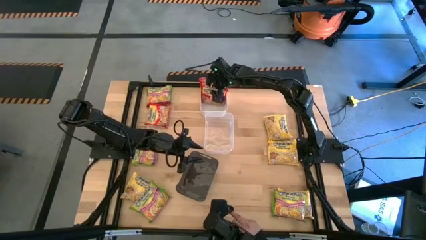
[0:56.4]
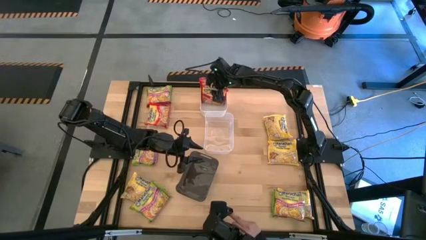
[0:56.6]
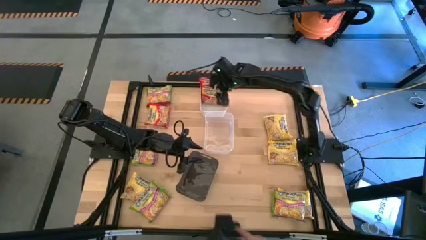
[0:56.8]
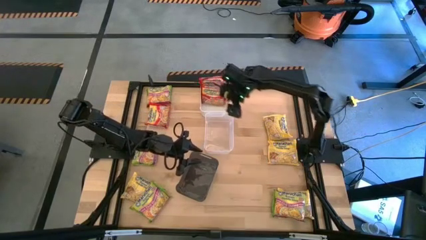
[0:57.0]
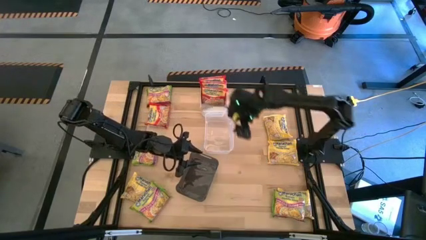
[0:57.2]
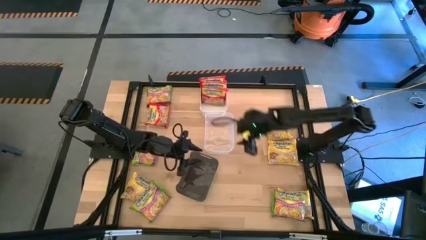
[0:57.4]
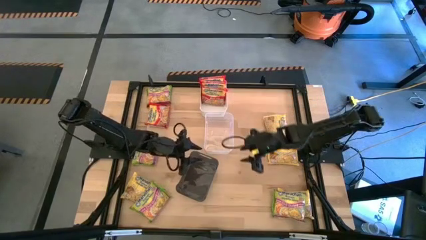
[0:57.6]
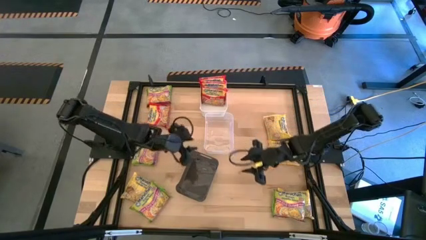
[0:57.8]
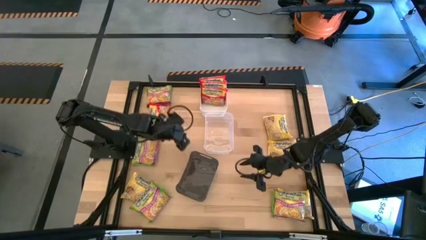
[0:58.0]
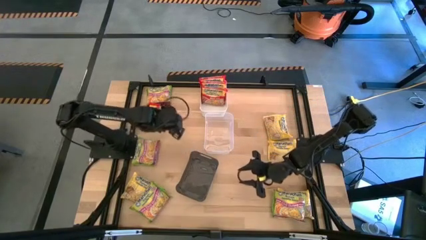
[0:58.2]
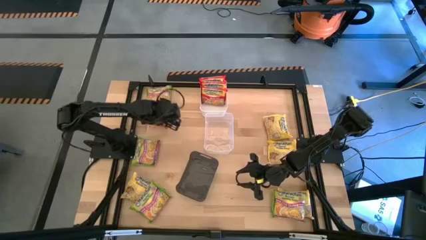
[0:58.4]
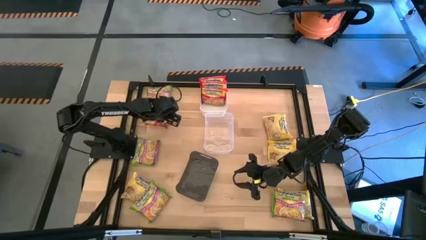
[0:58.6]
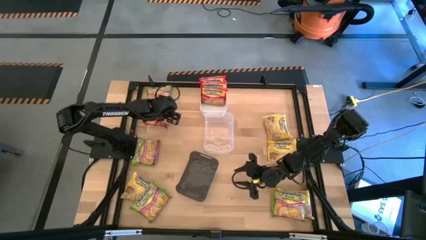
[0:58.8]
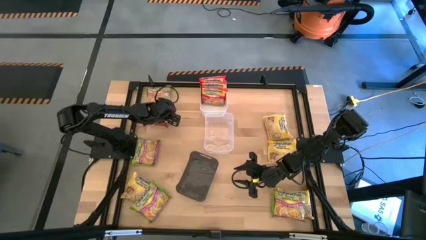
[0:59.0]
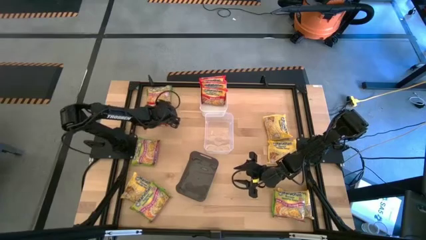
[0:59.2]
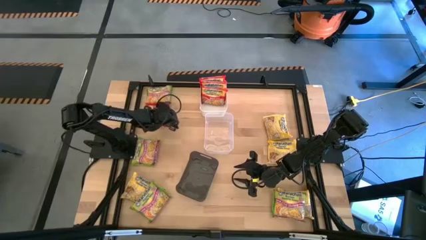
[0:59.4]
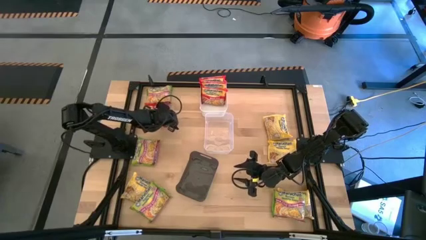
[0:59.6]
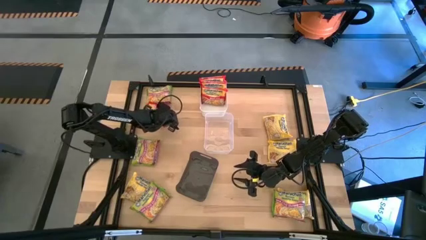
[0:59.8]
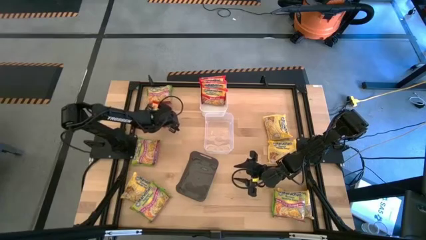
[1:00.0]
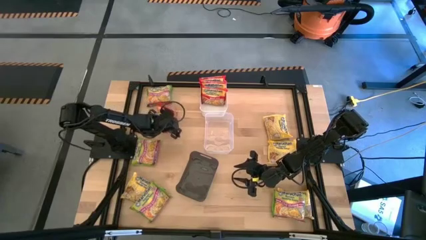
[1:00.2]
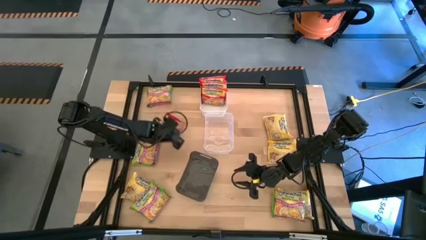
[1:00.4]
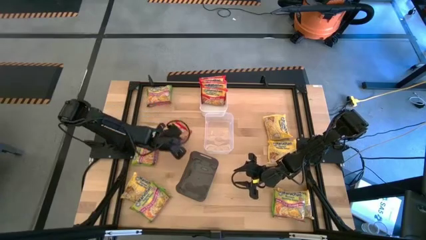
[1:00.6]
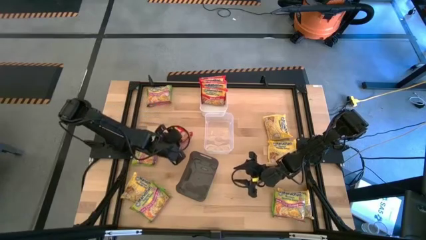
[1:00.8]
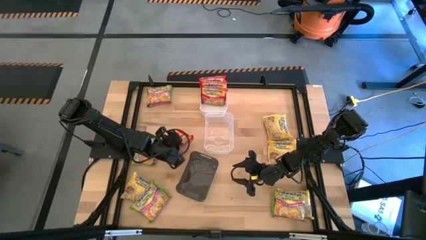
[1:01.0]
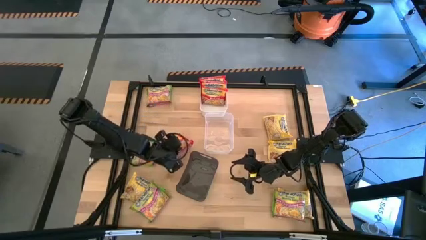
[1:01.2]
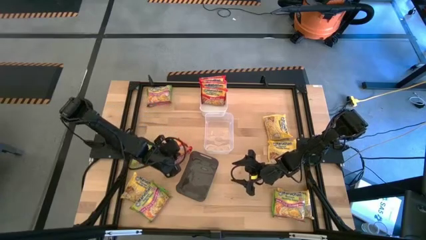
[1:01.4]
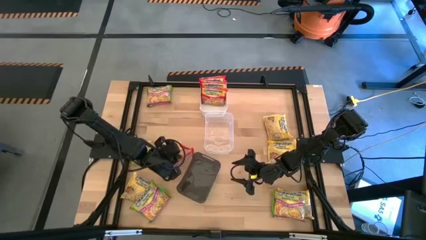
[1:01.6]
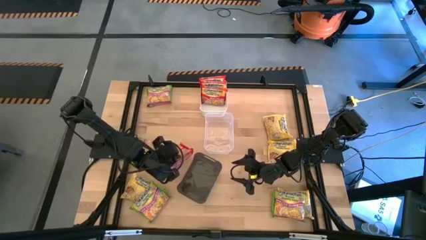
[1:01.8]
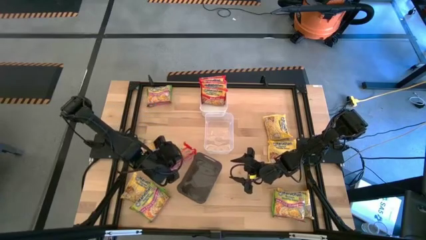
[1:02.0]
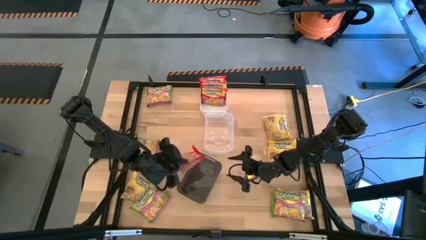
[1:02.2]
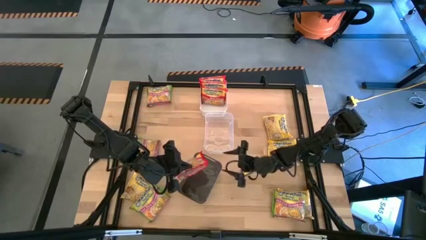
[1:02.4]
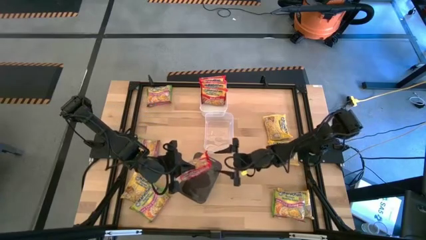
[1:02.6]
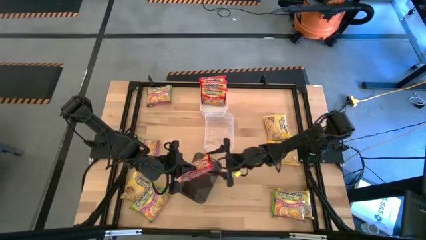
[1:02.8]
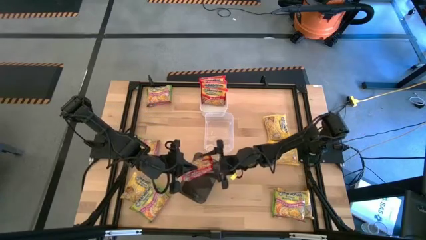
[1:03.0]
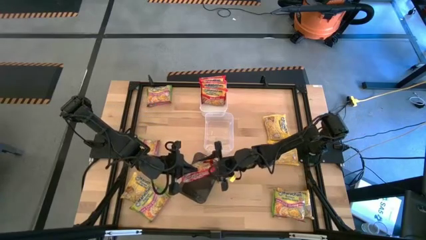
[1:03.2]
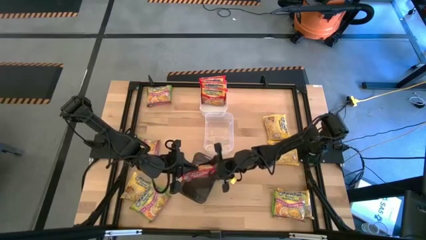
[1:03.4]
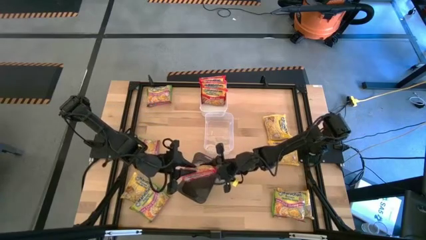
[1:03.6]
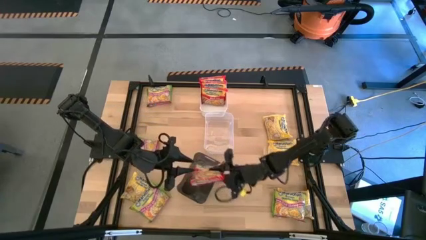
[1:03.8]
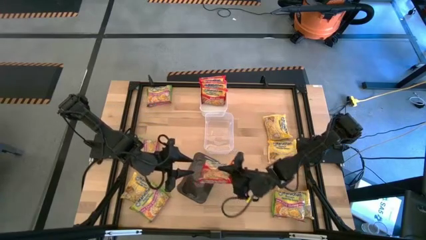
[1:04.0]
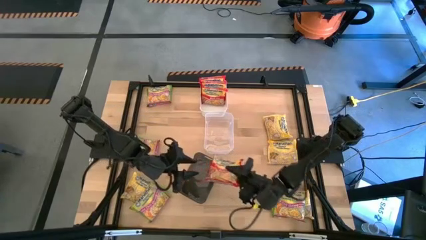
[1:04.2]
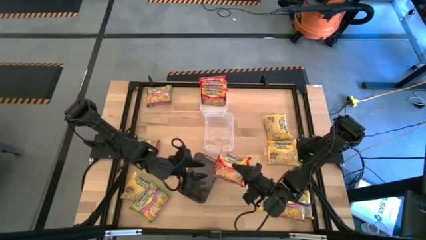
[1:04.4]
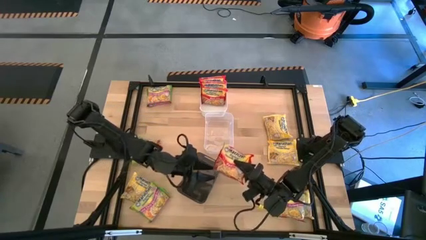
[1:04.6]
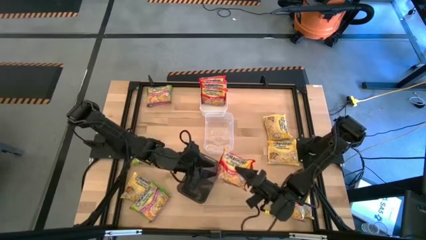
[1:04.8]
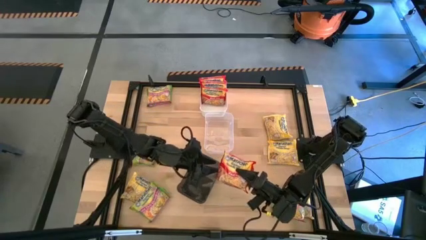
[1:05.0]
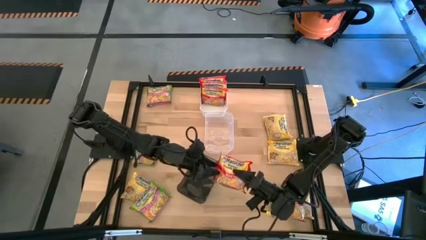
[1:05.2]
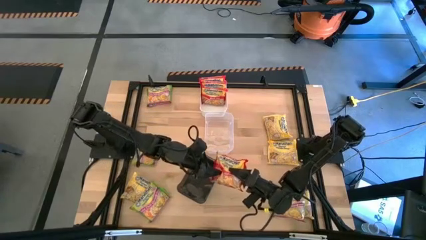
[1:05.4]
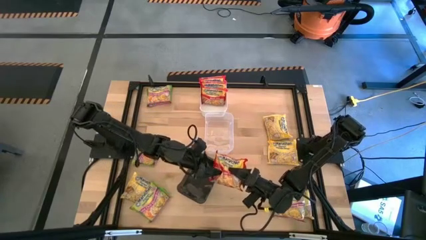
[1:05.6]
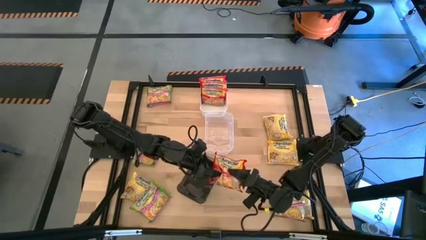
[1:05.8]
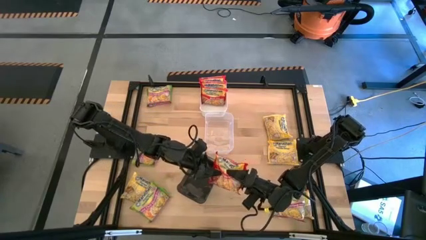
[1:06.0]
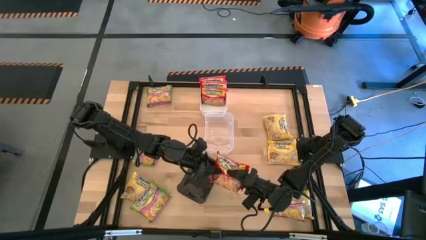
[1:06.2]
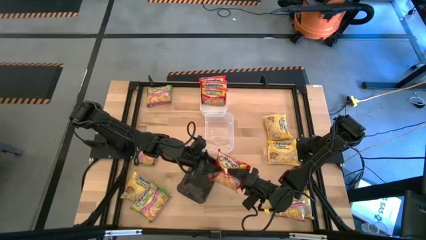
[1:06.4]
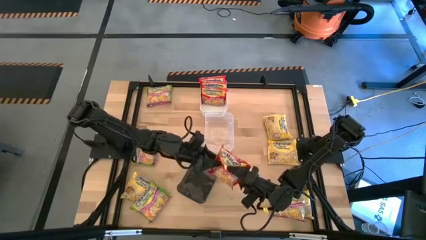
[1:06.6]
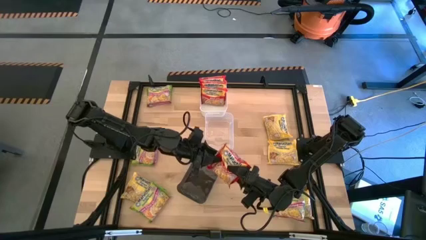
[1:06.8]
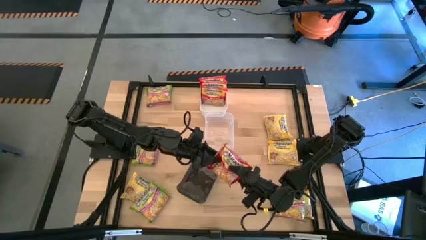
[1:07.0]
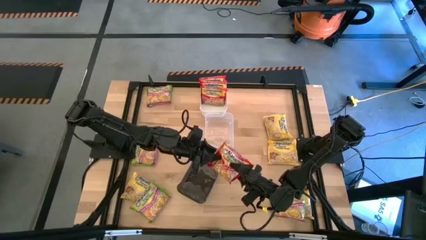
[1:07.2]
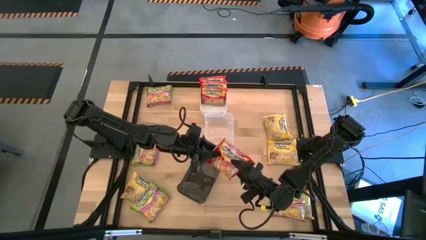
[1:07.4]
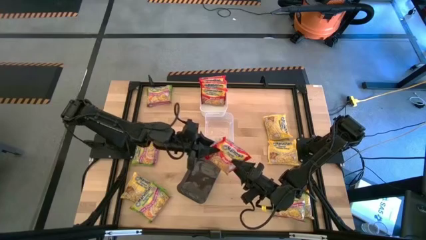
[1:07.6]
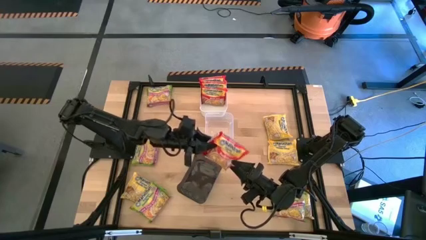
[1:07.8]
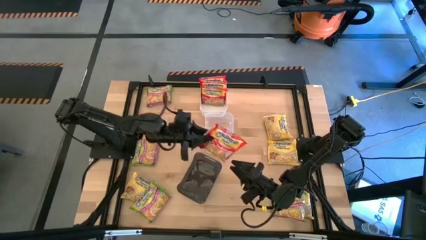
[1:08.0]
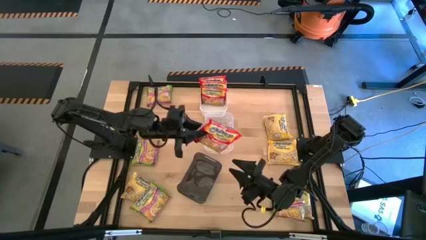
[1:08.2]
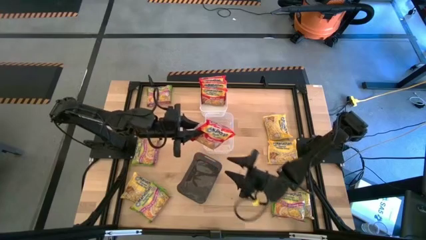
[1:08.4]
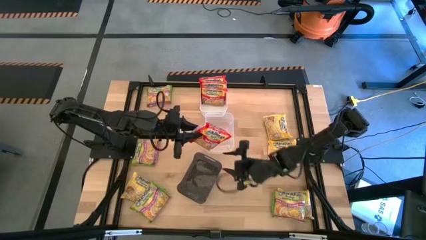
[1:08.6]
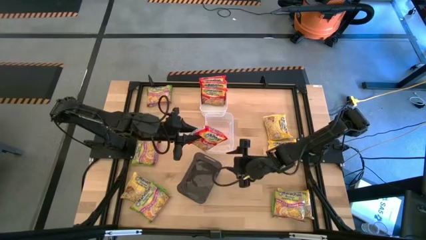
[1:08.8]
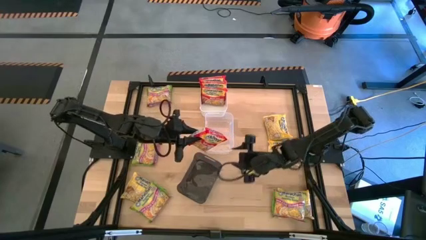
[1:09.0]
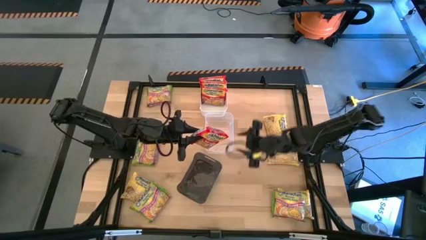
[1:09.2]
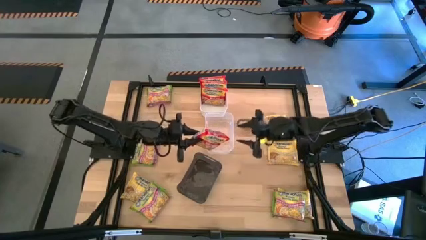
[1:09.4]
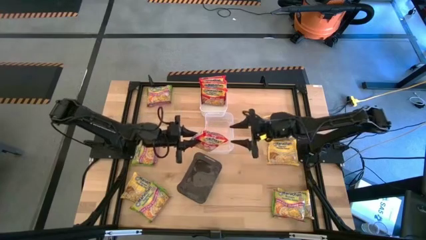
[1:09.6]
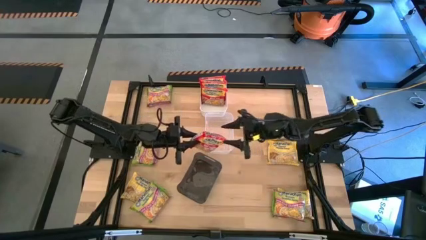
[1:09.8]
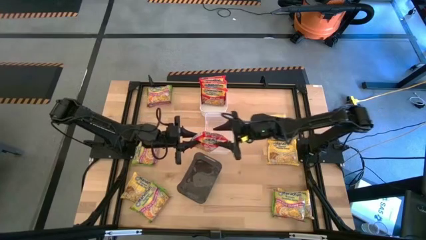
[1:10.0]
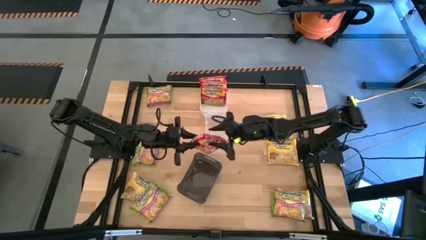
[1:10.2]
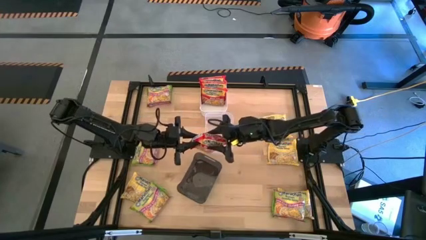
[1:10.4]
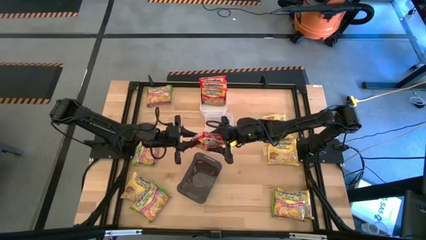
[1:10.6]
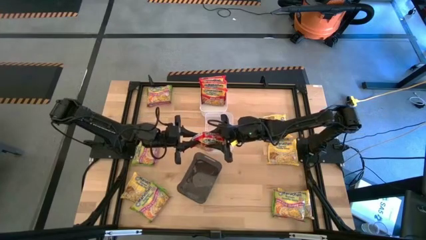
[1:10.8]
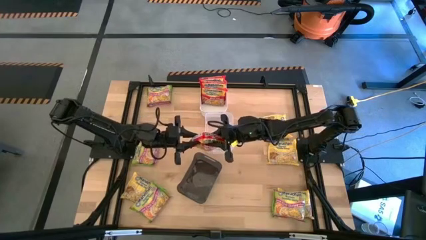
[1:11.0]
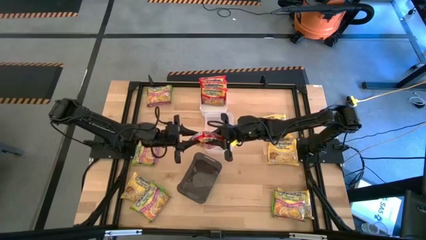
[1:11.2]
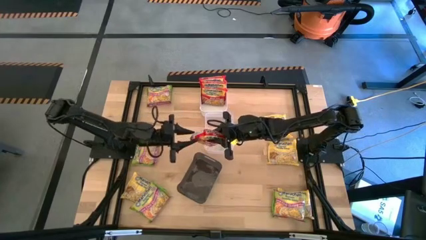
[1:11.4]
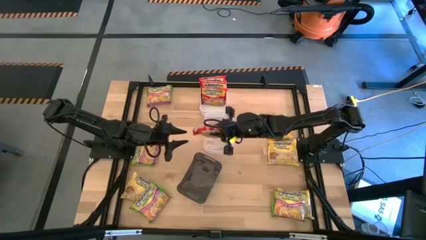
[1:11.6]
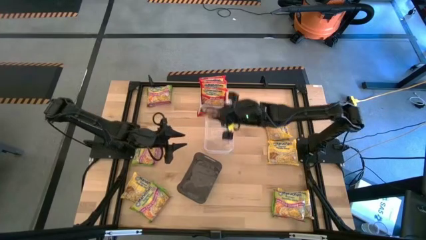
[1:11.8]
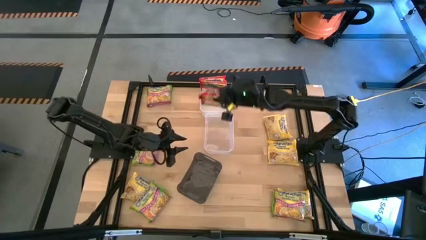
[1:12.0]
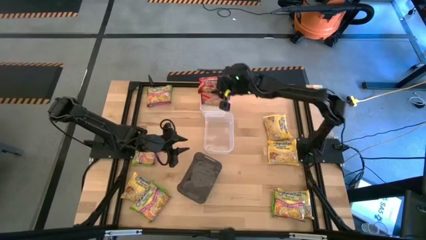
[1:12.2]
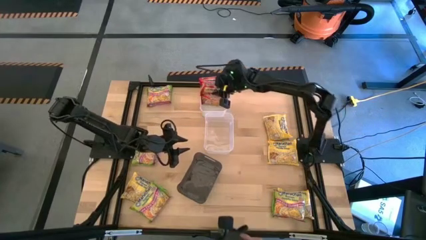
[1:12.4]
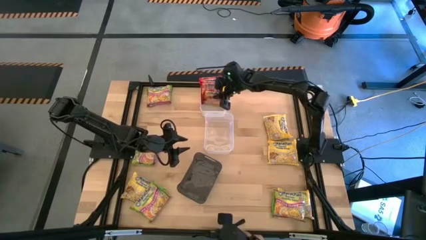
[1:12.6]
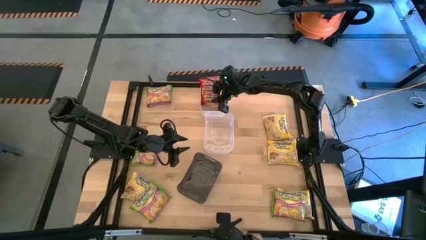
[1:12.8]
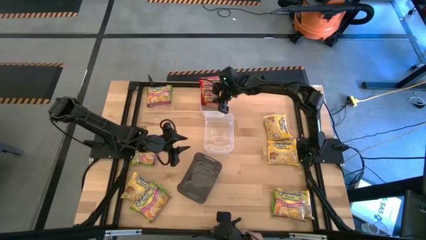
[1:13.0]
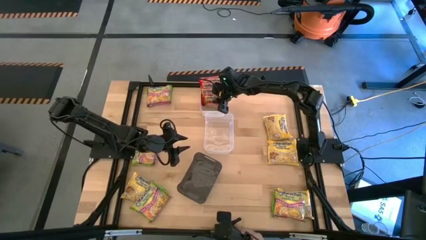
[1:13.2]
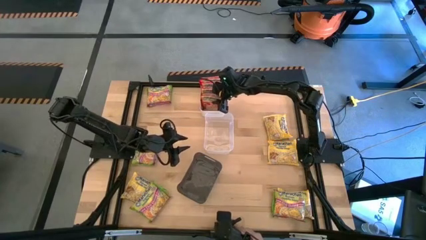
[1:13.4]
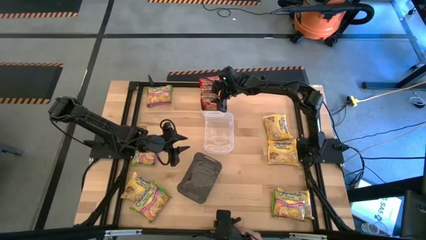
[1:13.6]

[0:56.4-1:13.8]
Task: Sort Maruchan noodles
Put the red noodle pack into the white bin
